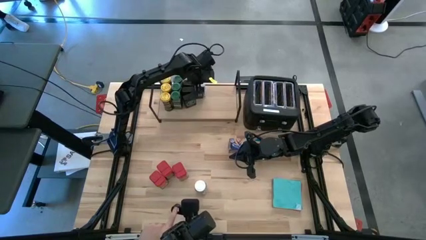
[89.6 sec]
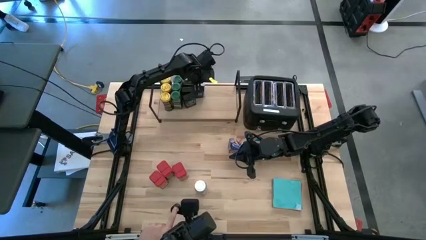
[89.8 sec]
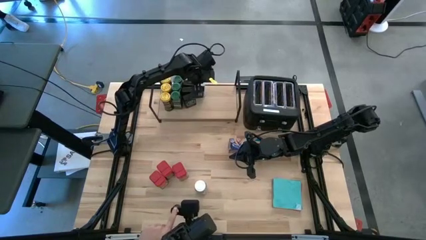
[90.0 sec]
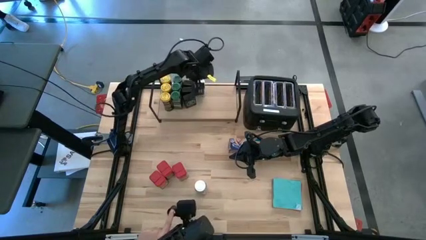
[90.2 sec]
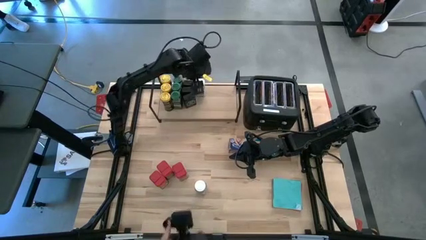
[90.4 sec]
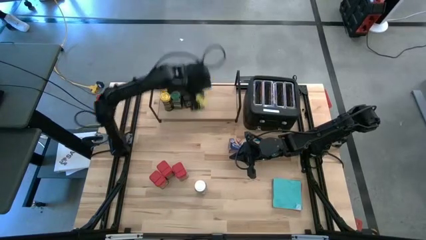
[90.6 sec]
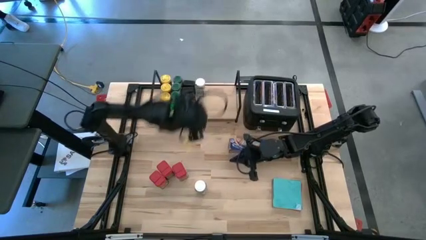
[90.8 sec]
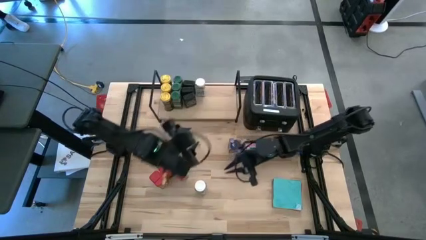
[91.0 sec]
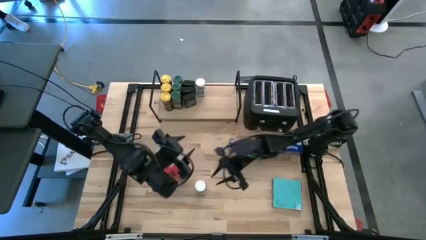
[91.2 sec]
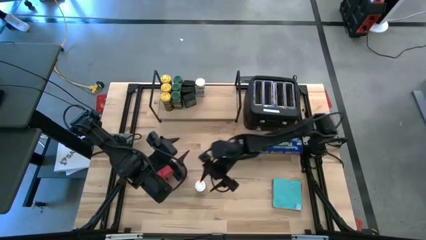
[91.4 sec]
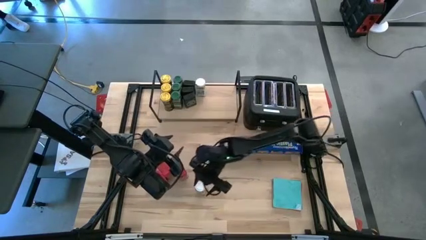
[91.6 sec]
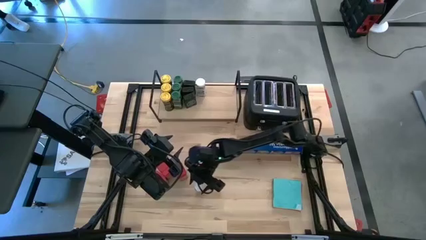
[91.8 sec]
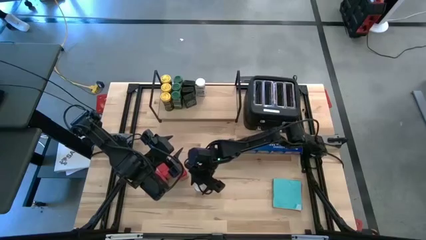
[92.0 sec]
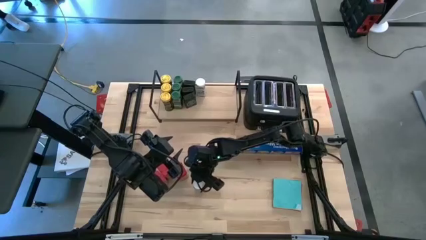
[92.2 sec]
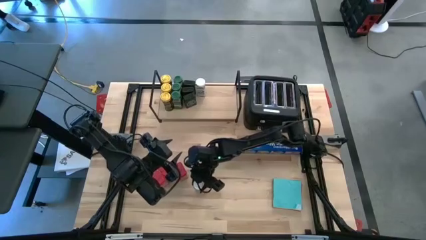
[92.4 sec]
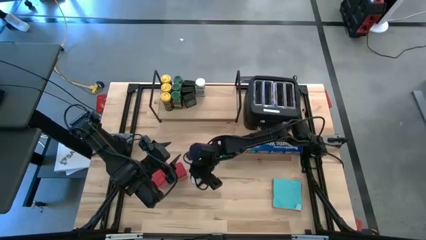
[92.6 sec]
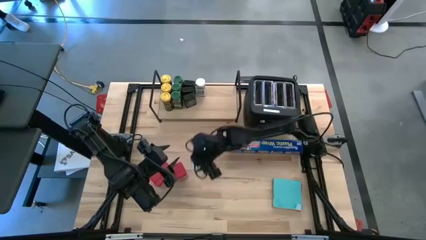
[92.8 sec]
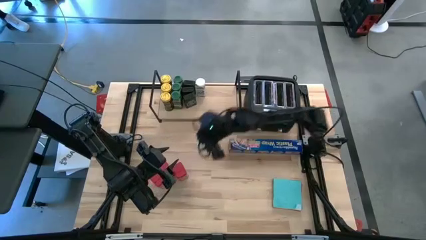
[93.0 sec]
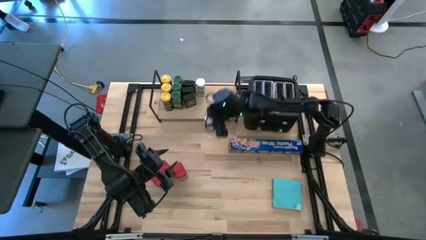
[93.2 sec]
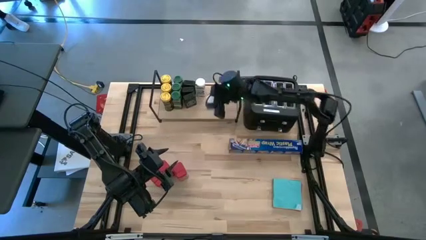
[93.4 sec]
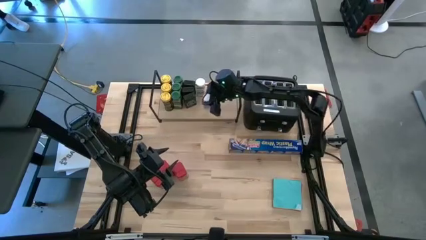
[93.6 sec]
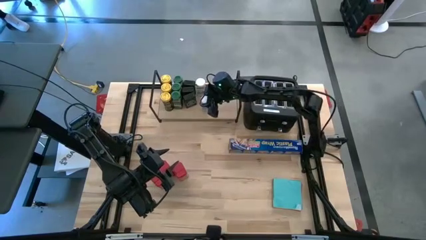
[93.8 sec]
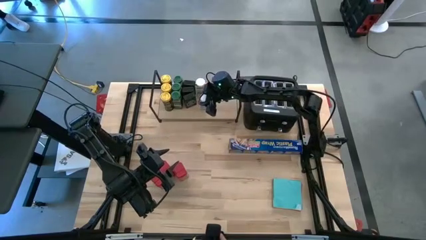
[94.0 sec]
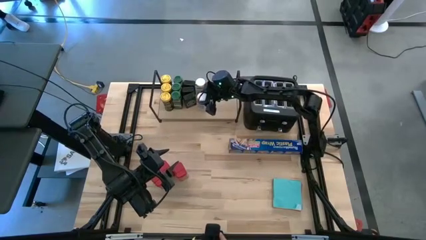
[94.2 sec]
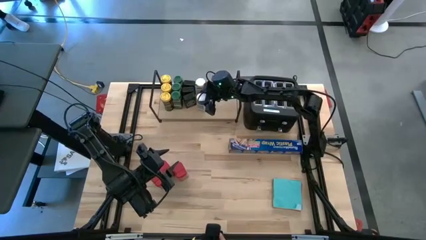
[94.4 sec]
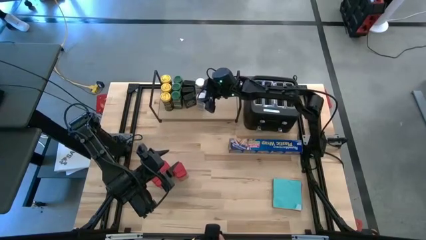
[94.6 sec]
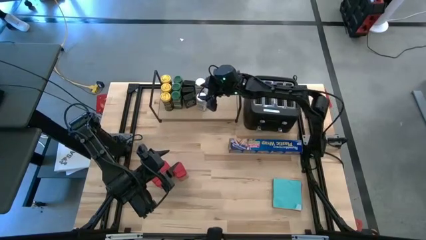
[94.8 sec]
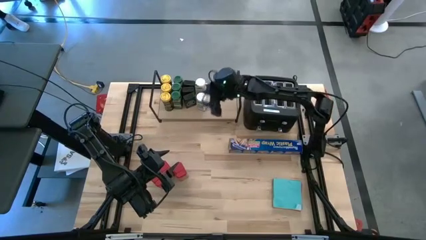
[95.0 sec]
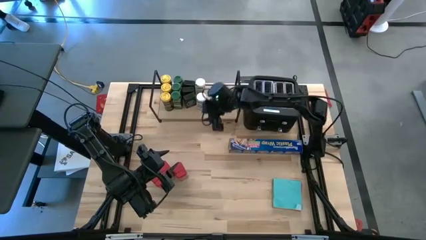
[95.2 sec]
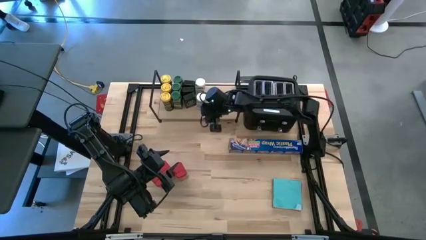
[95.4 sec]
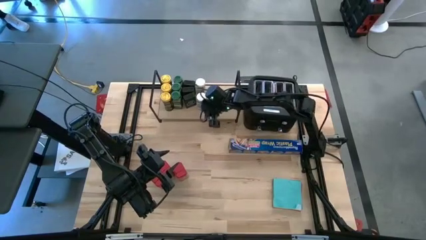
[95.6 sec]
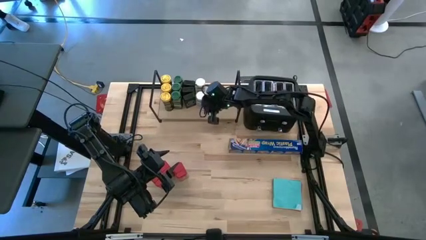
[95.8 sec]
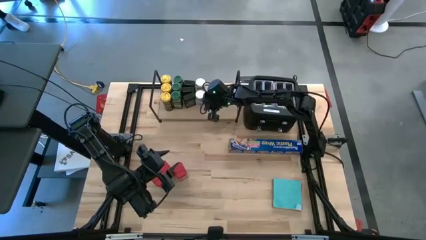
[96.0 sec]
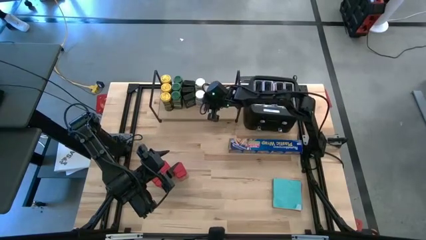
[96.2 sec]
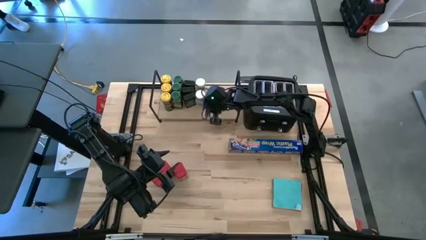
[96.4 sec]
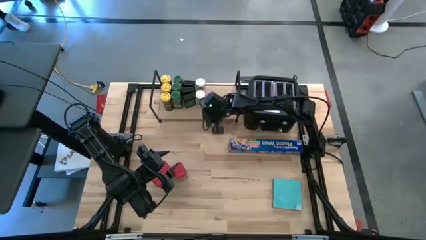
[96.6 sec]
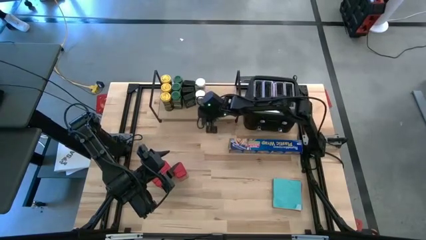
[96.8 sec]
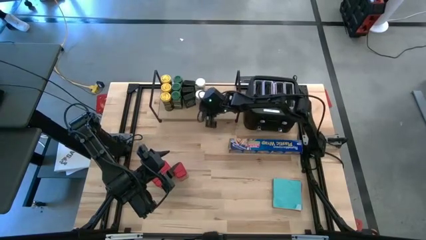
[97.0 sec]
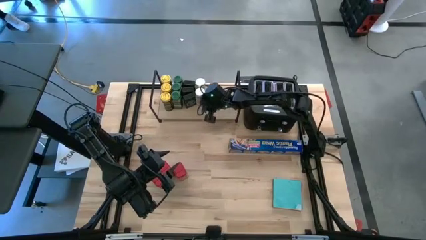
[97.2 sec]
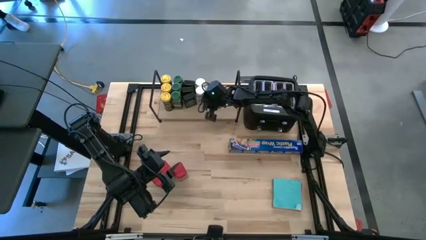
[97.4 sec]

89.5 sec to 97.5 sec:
Task: Shelf spices
Put the white seasoning bottle on the shelf aligned with the other white seasoning bottle

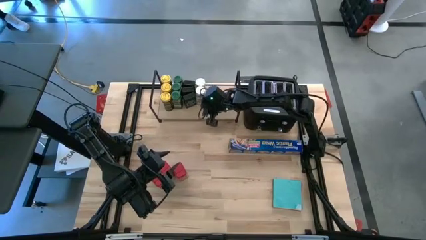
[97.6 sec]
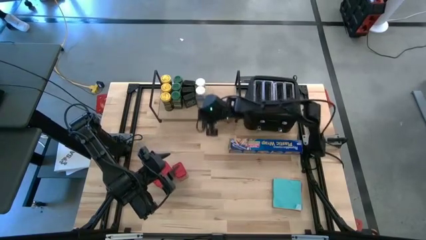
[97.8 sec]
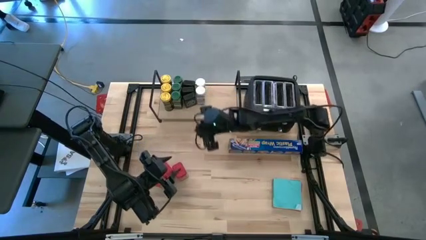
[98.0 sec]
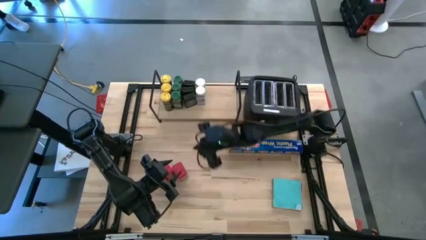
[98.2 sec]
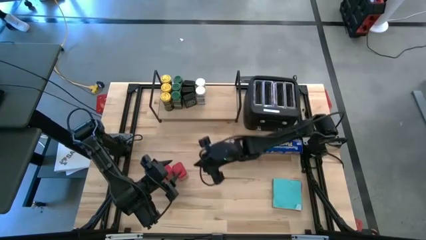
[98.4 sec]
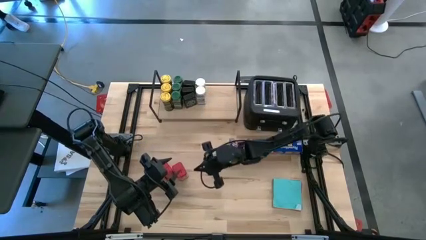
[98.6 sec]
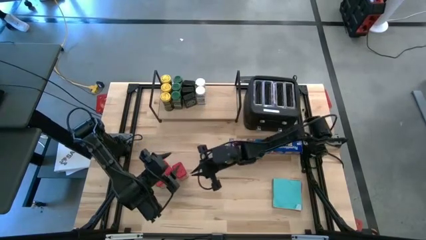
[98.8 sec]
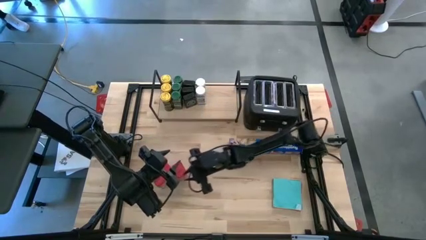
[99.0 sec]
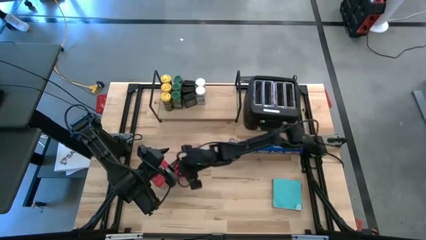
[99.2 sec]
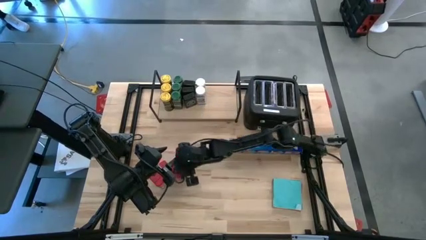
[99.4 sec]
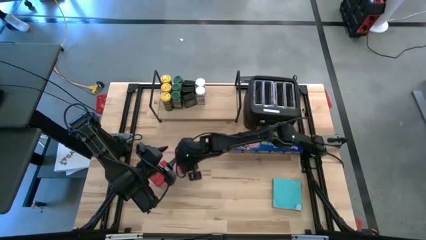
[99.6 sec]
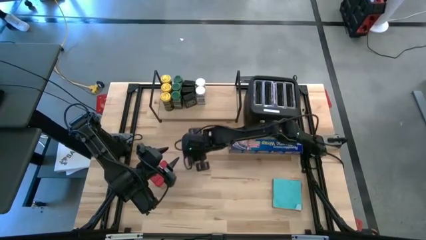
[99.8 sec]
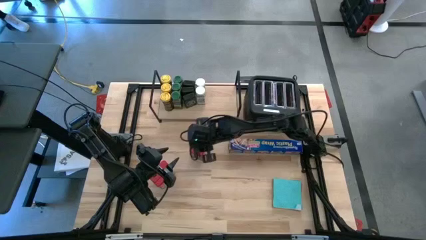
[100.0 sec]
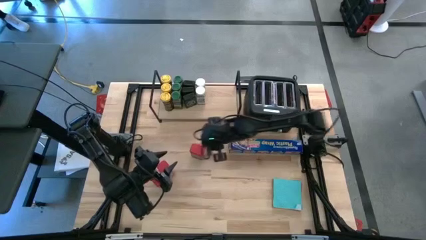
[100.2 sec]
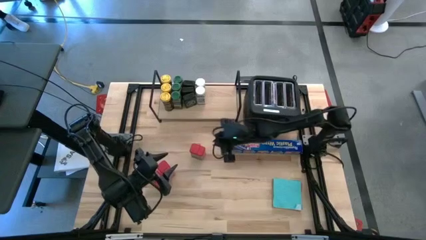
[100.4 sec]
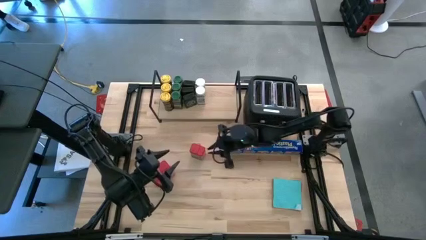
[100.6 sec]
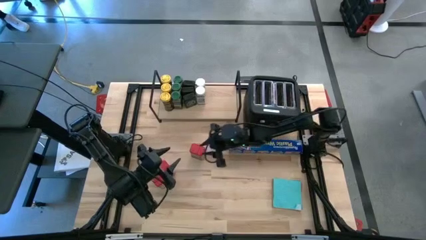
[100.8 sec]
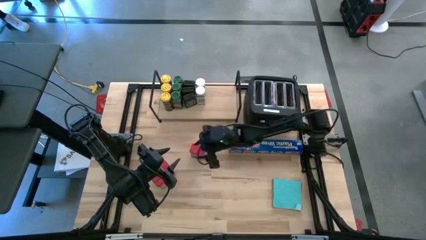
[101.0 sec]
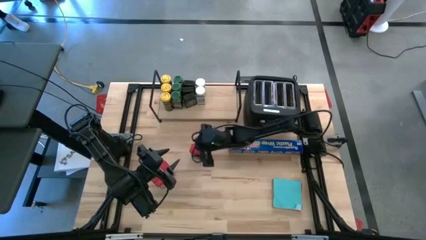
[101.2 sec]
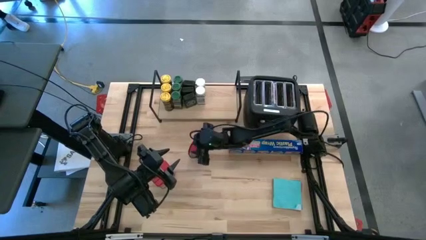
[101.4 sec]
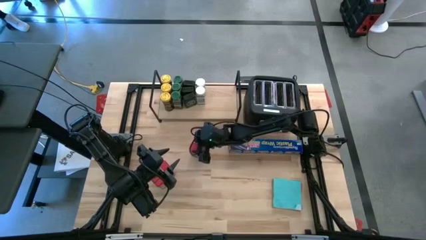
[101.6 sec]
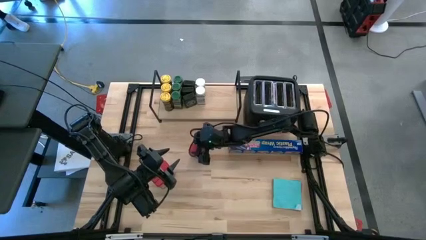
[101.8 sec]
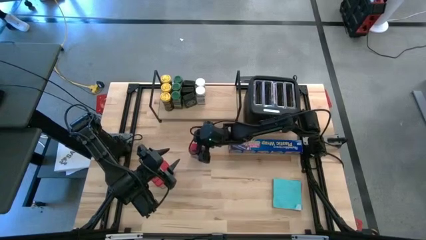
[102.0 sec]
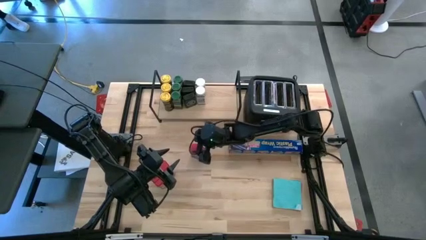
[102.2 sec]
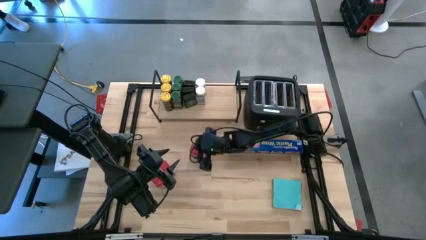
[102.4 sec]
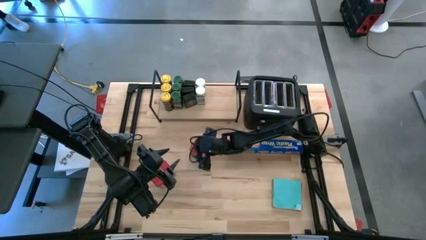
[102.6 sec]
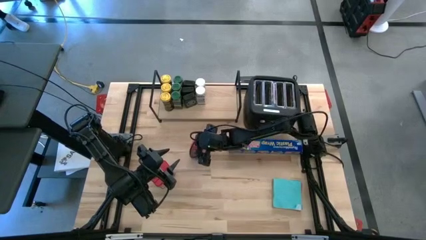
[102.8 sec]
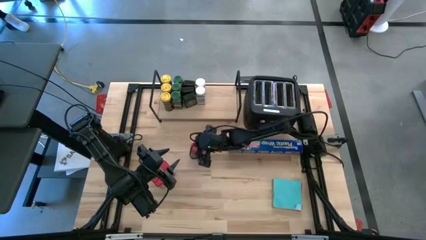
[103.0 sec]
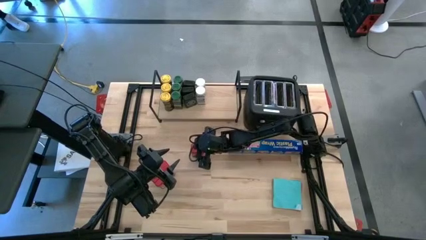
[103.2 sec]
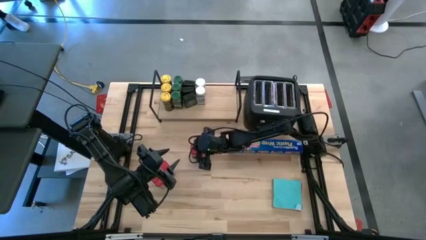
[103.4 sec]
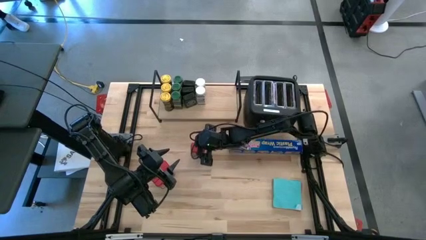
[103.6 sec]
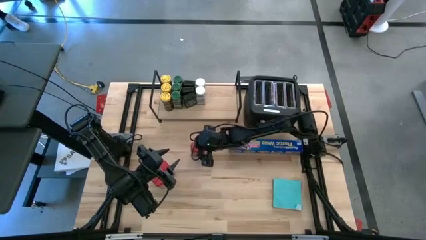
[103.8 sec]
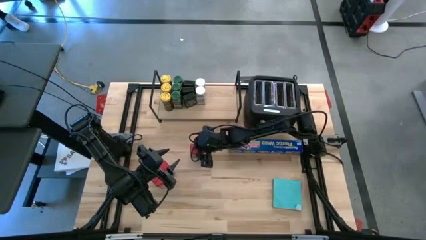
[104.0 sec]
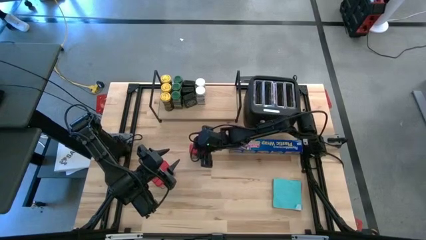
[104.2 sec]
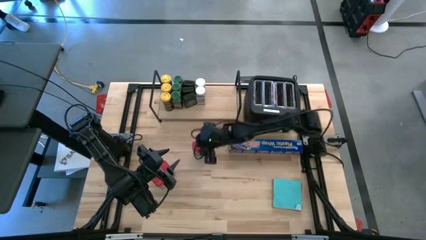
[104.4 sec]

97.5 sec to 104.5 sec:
Put the right red seasoning container on the shelf

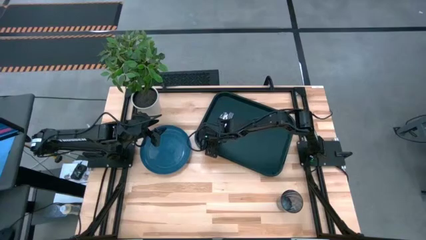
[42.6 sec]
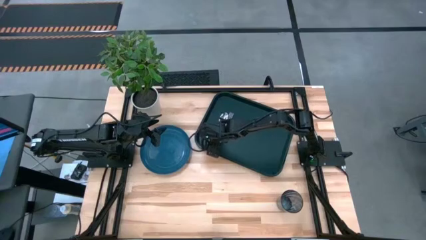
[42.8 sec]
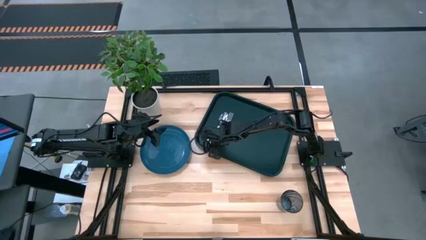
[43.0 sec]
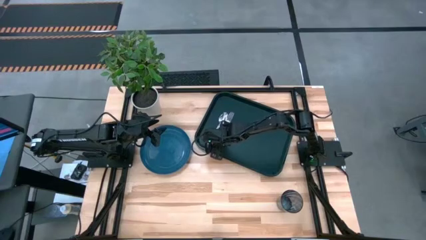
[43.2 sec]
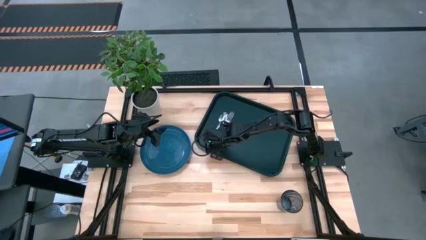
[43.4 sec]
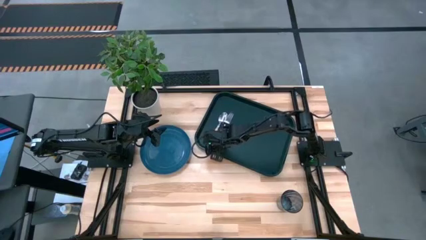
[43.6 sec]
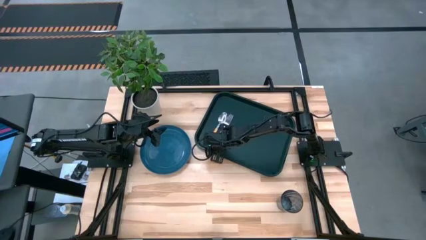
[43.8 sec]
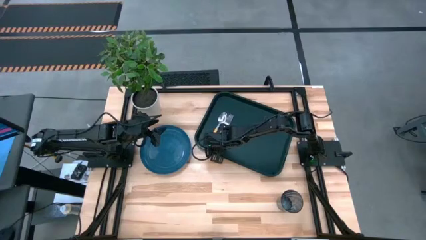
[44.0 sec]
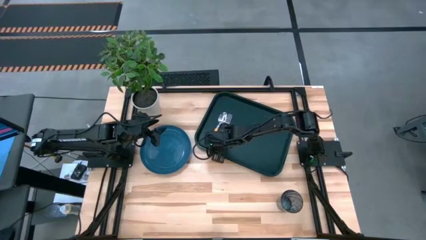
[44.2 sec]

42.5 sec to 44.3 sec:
Task: Pick and place plate/cup/fork/spoon on tray
Adjust the pink fork on the black tray
